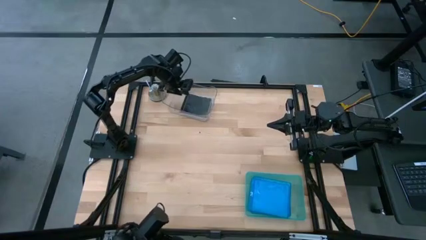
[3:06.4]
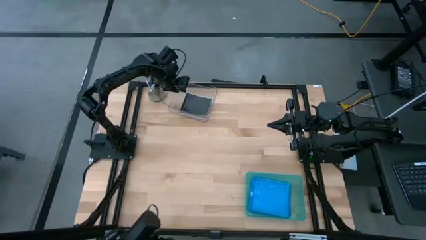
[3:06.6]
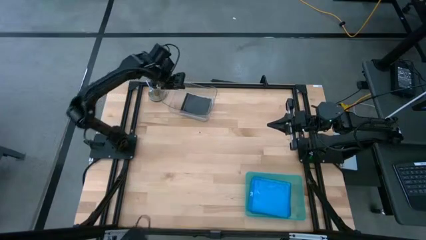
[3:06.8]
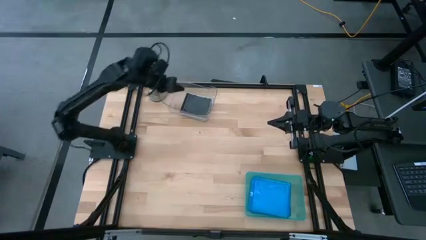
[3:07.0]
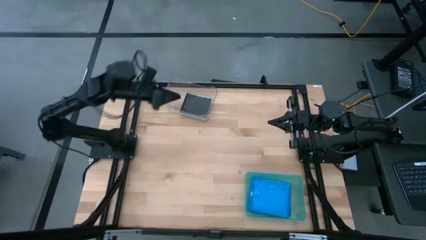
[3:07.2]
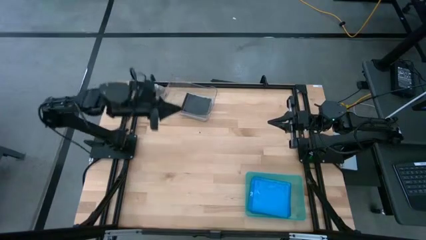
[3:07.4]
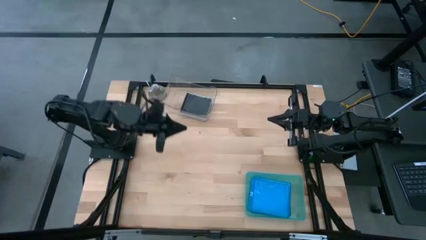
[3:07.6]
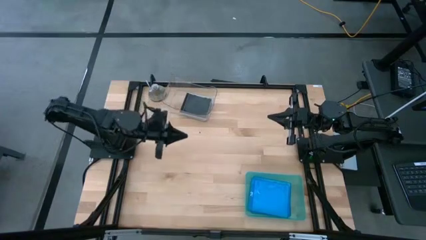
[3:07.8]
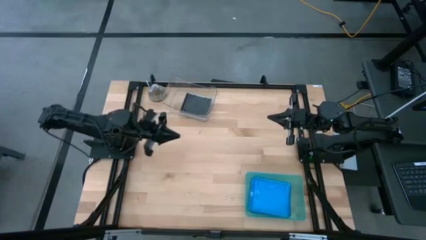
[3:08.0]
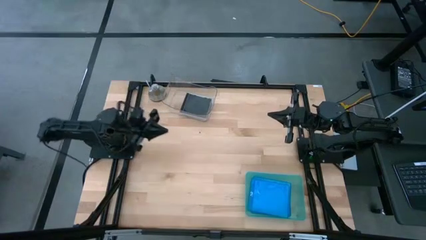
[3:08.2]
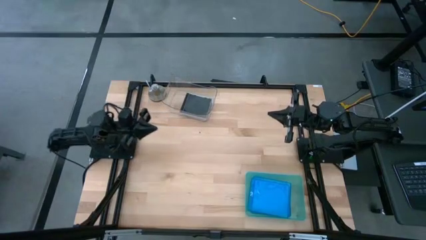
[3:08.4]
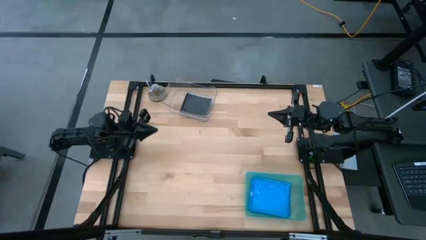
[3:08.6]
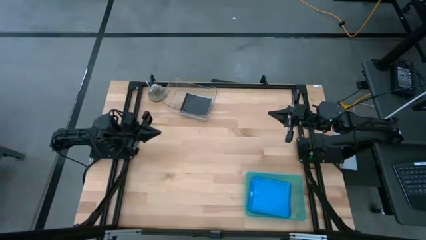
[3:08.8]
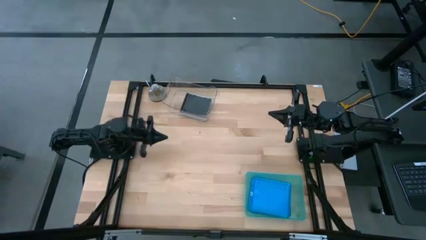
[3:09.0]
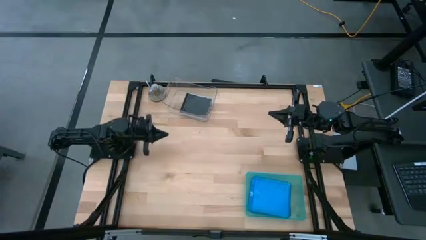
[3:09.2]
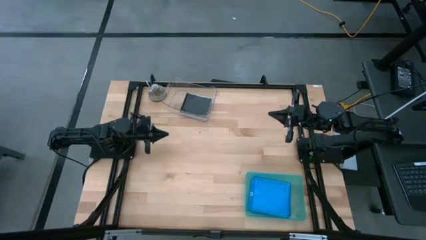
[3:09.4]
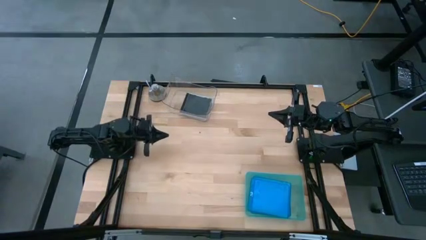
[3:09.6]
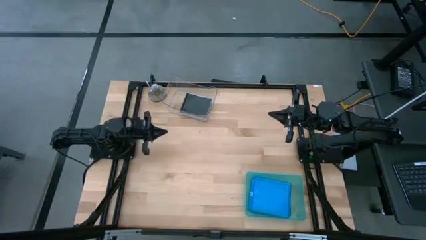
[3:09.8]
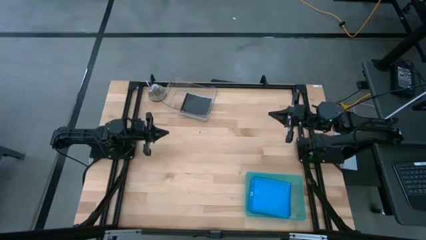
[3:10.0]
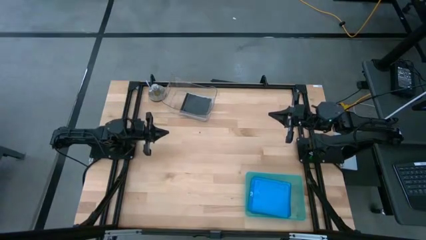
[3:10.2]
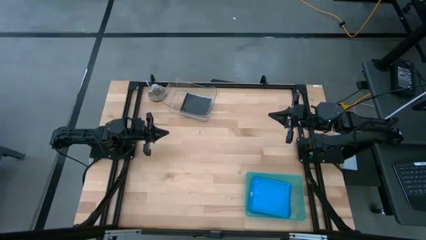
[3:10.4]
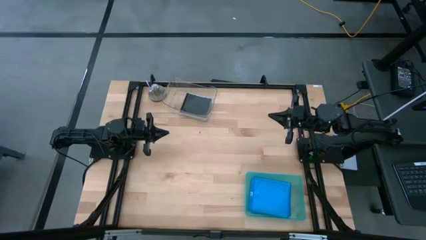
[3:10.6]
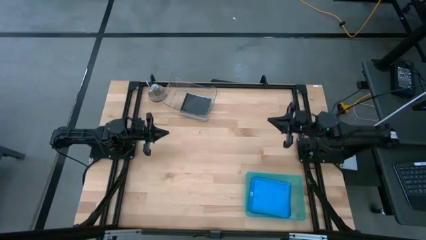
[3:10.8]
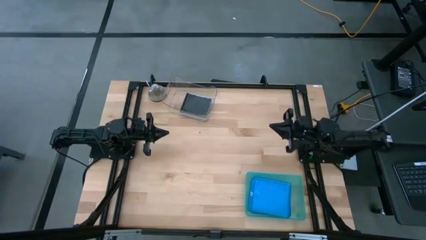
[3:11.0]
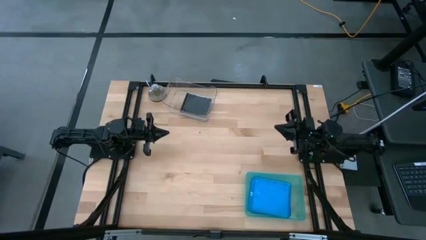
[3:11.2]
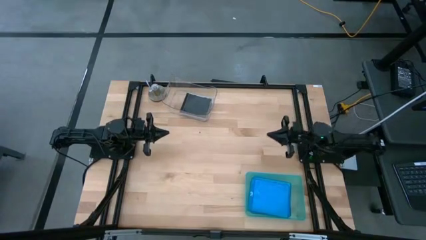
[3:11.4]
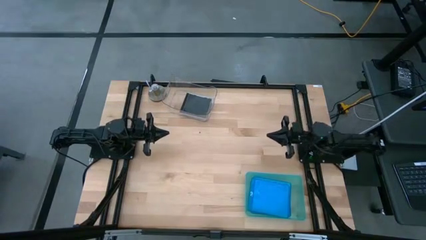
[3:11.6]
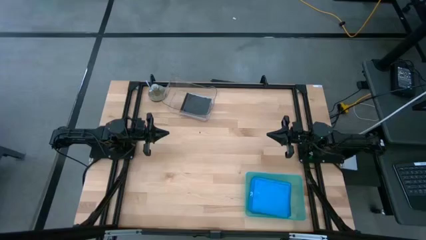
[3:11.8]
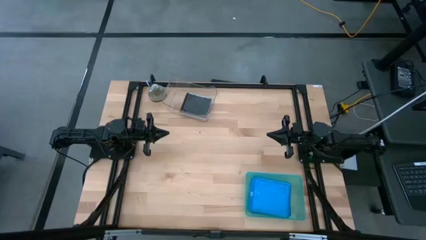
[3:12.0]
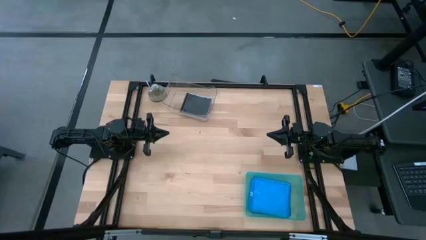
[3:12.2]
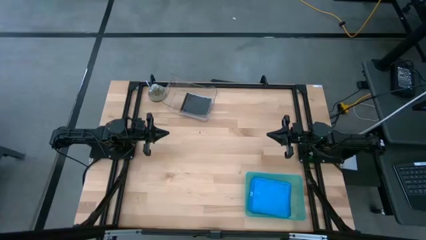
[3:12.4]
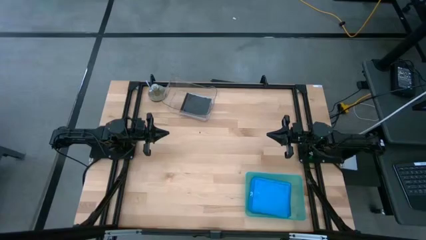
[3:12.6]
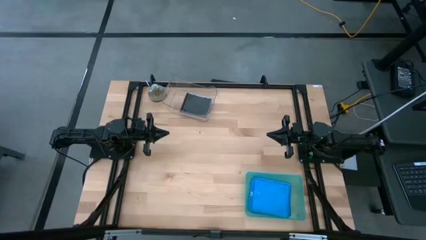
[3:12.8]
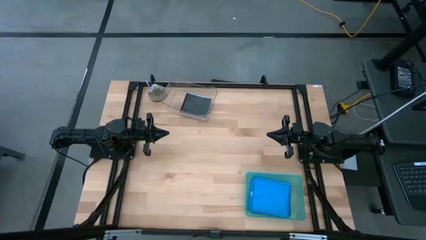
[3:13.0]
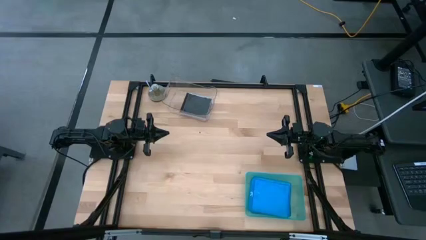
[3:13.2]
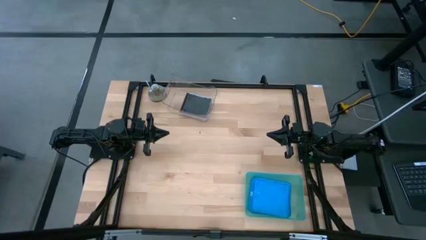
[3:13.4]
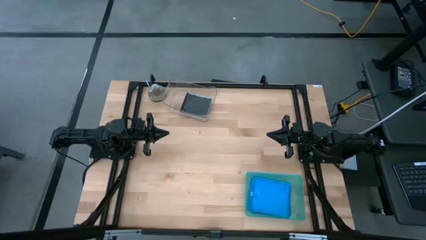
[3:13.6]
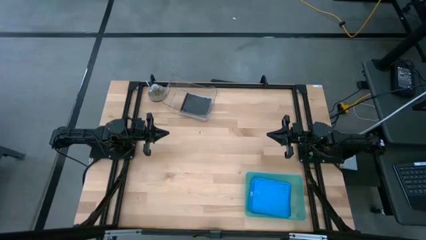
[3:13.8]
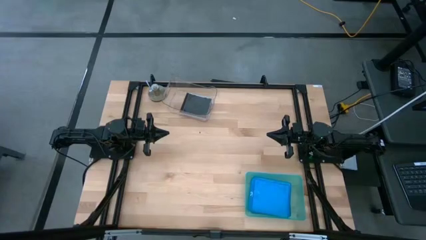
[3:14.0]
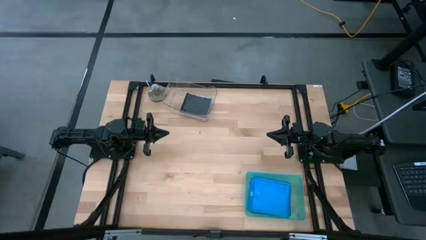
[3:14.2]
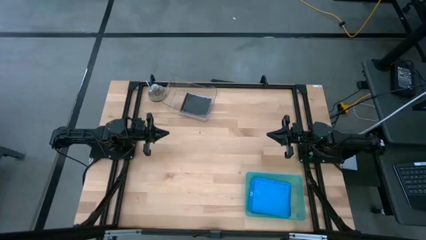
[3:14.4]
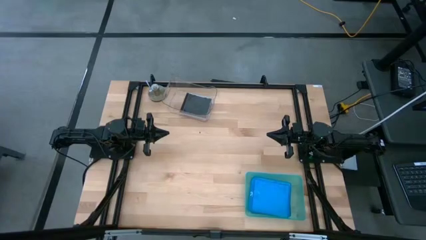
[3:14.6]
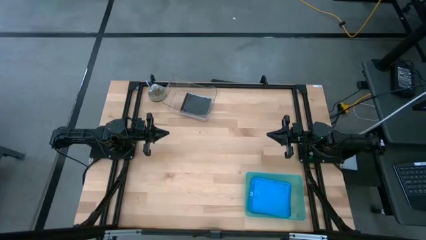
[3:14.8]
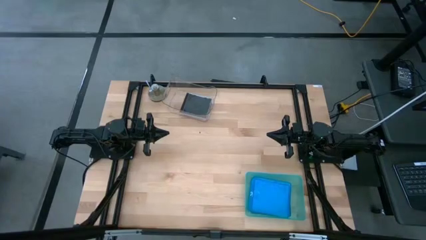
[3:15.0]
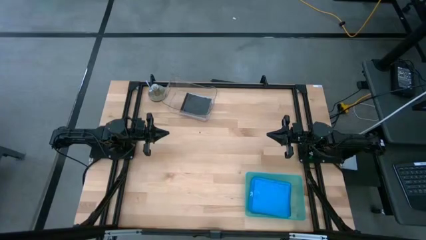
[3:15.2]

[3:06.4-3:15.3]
Task: Pick & place jewel cases by type
Return to Home Position

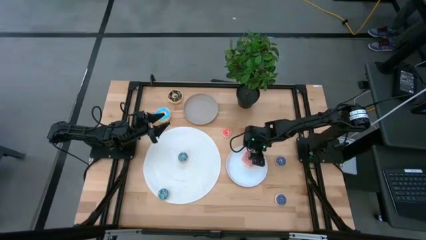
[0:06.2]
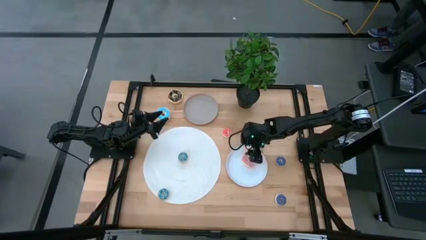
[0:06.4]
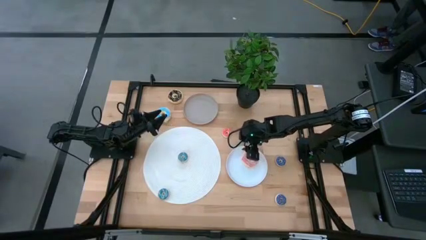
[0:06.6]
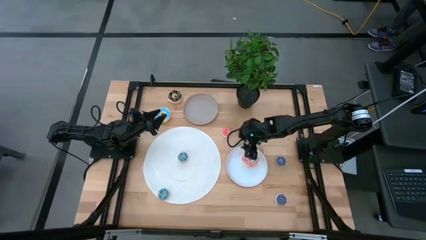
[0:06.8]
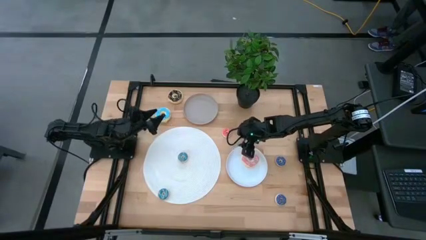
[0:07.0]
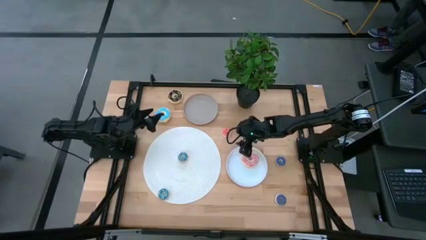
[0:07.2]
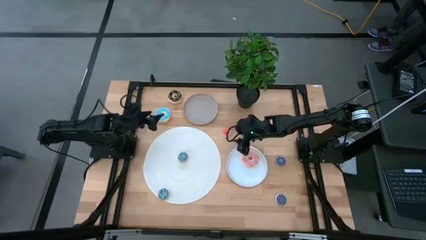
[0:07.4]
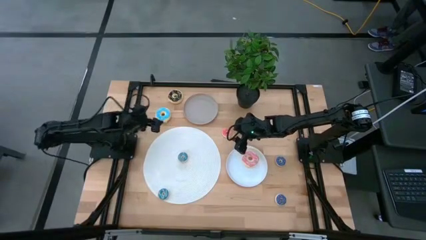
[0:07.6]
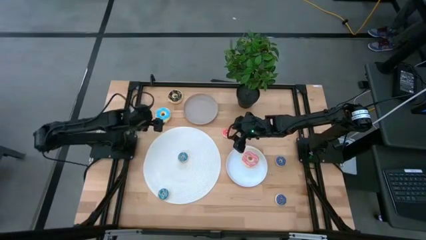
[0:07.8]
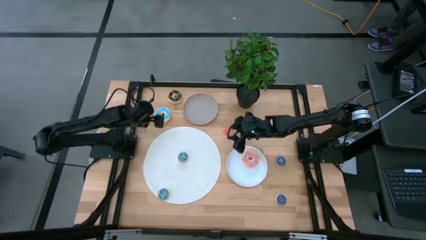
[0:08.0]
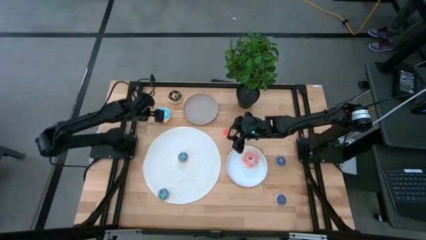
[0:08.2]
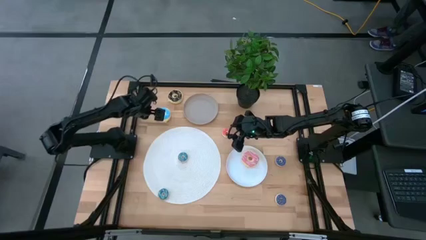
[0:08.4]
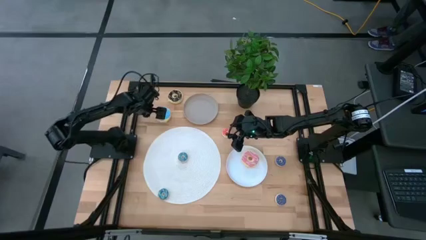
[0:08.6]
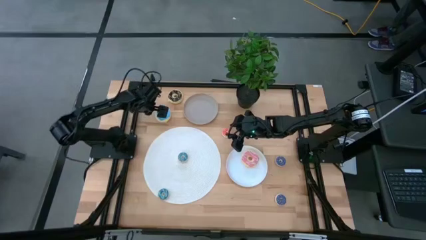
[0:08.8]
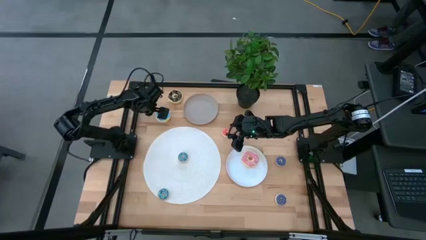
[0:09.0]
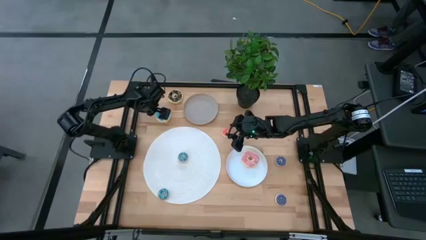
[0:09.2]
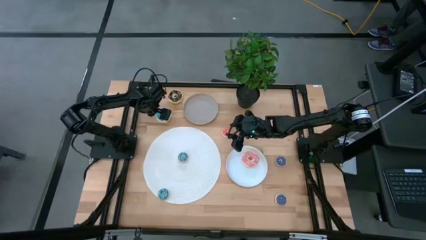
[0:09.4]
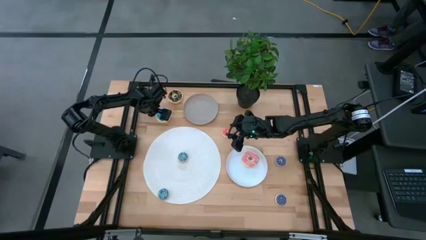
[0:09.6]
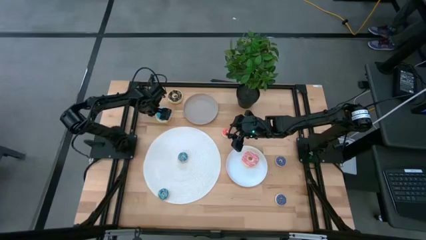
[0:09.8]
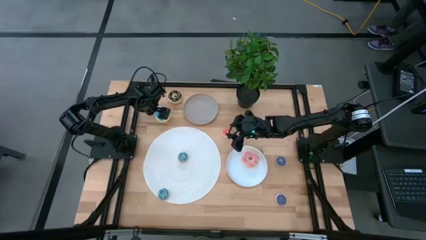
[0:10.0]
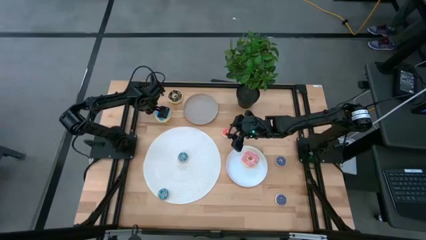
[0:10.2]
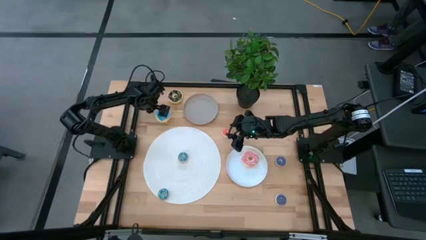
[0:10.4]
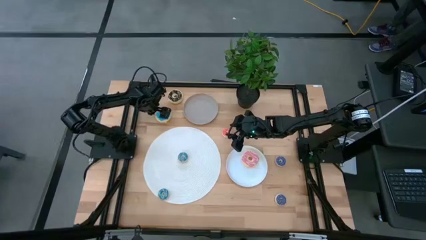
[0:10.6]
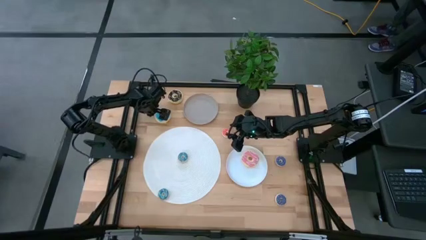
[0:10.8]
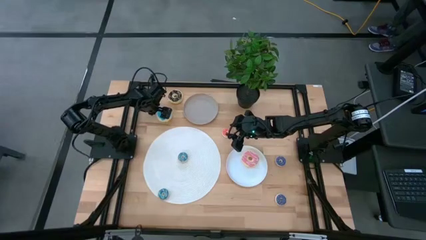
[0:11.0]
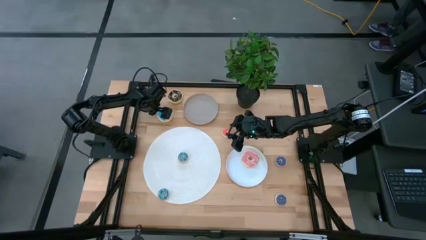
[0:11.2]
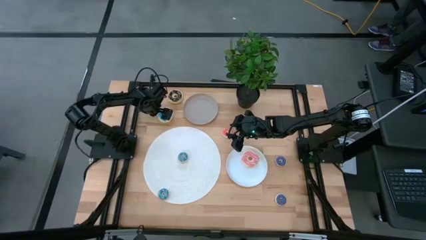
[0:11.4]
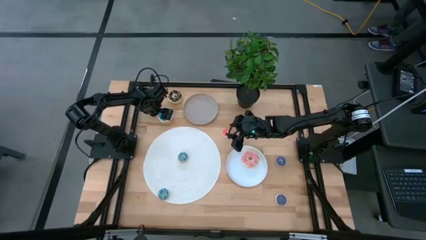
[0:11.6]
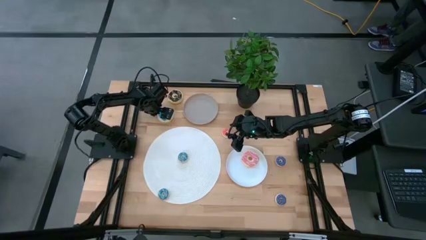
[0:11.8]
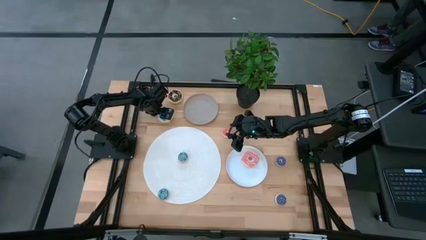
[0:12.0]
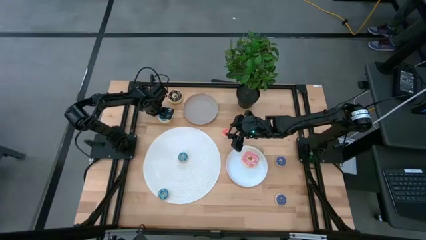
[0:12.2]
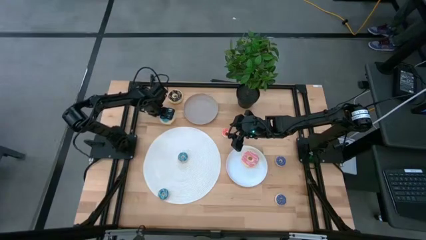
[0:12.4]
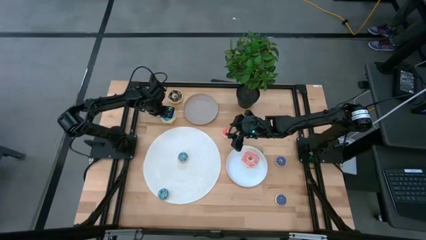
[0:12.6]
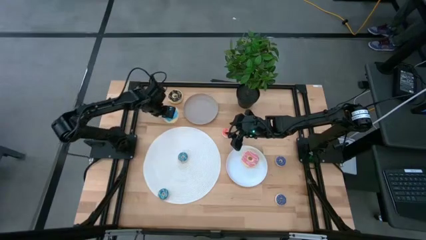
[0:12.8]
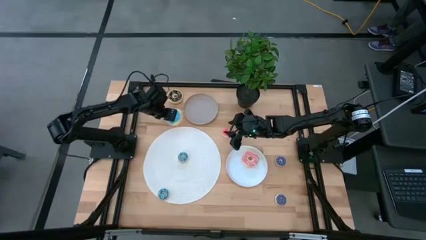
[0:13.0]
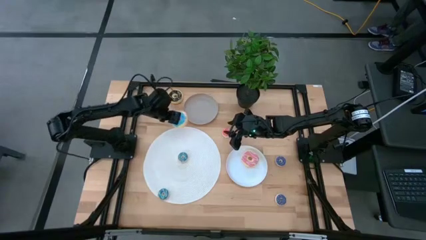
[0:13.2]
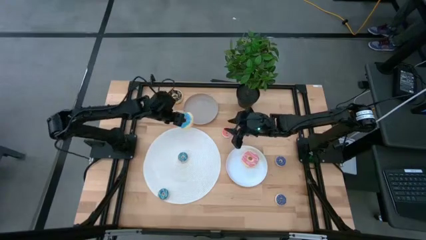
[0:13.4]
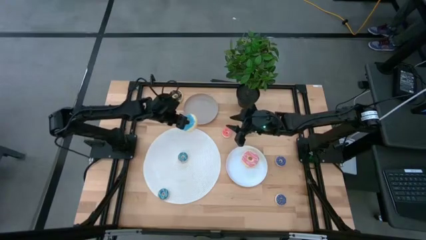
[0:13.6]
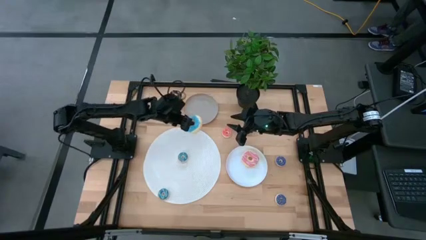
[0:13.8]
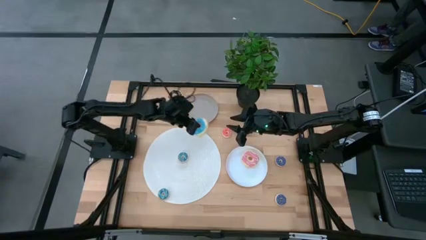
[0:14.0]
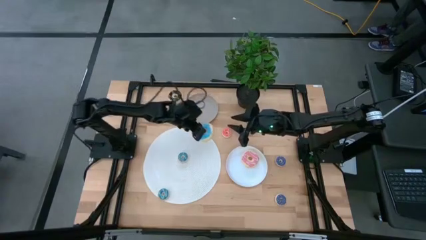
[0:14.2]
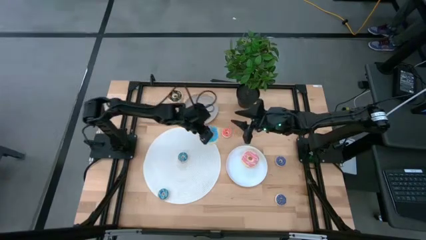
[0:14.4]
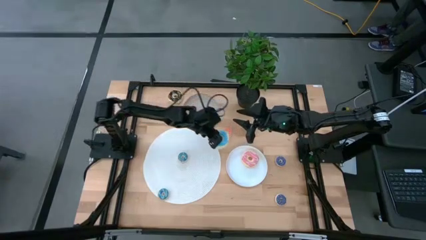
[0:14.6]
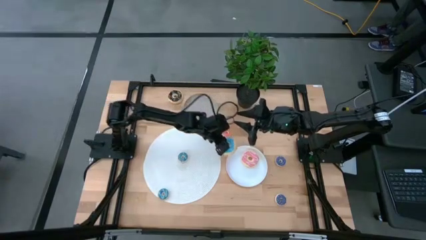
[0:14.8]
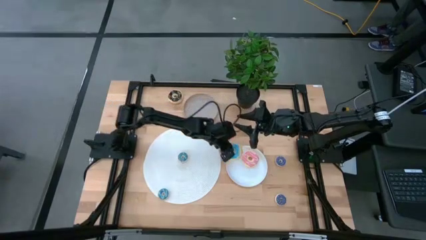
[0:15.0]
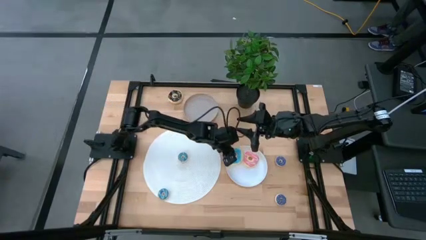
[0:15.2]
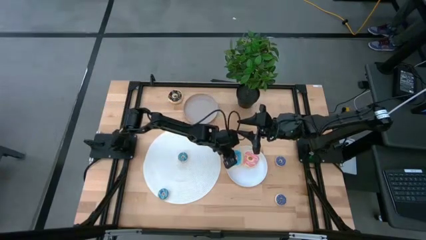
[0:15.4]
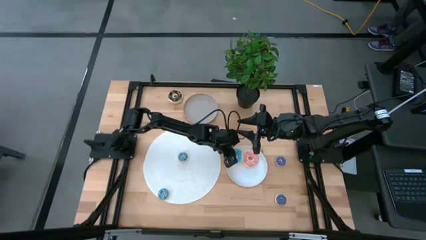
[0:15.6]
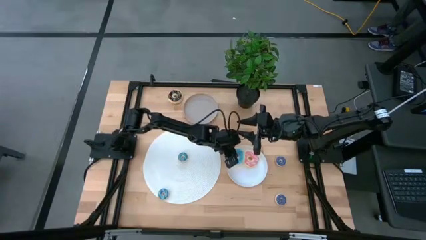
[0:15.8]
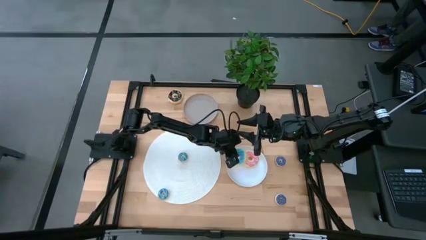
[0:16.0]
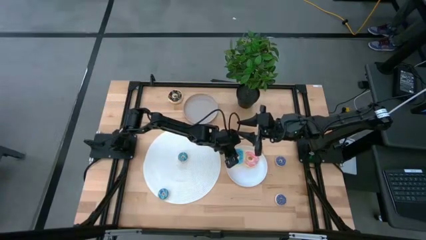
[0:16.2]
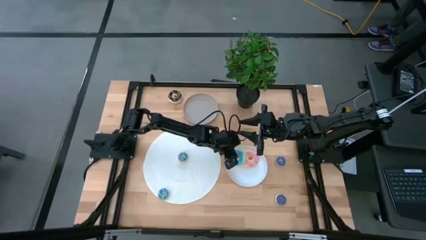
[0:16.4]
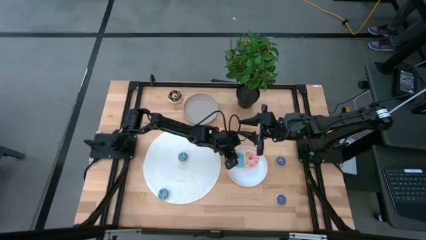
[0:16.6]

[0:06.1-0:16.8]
Task: Pick & Place donuts
Put the large blue donut on the white plate
